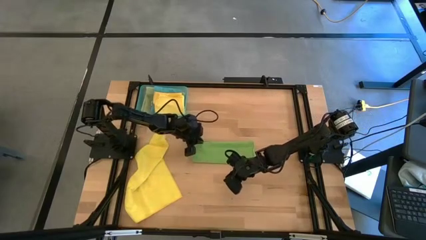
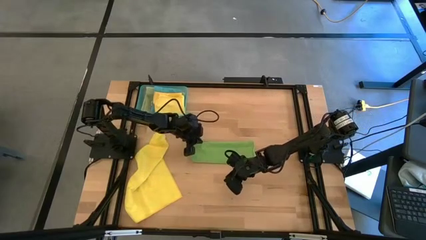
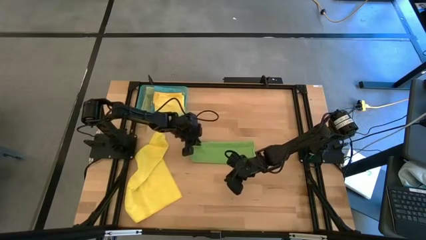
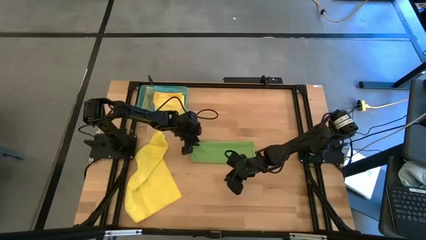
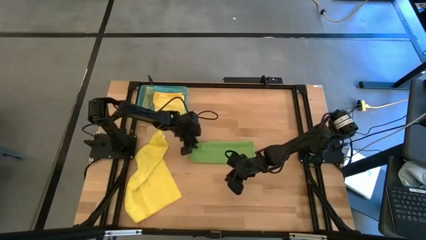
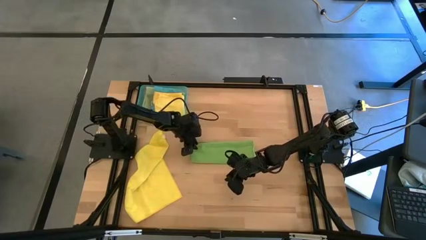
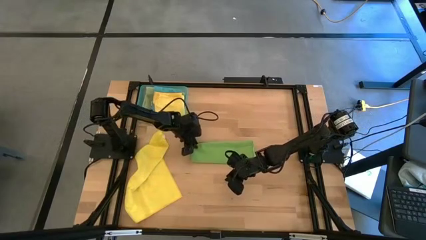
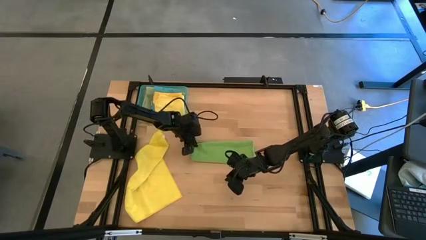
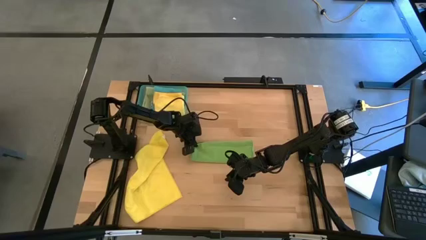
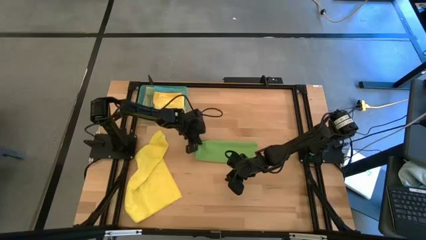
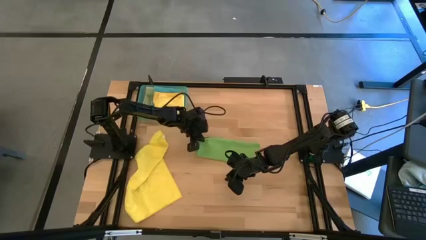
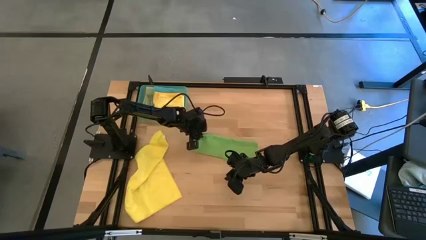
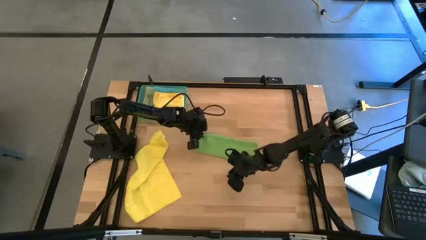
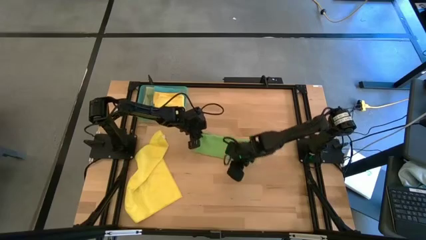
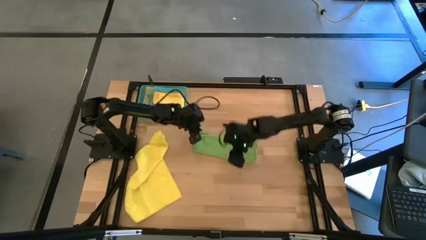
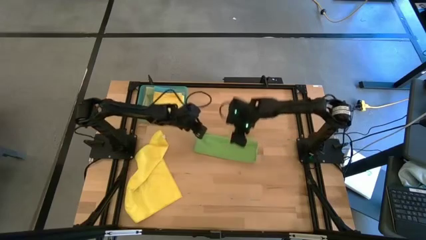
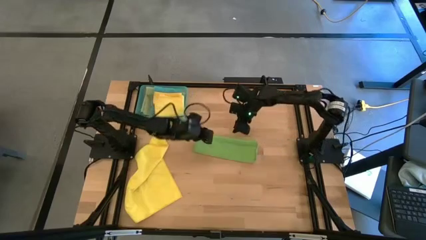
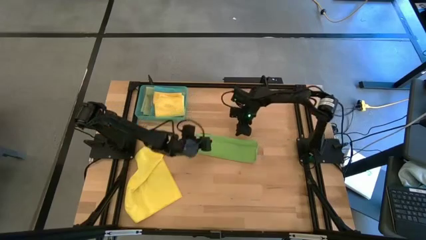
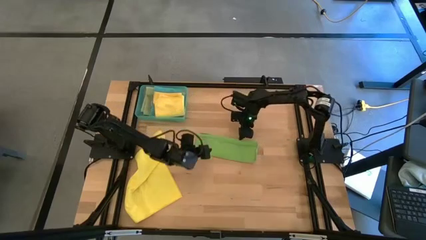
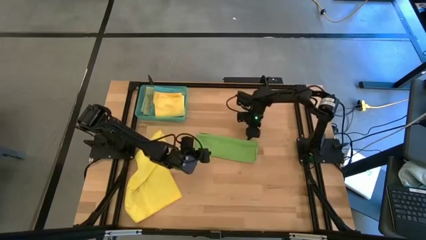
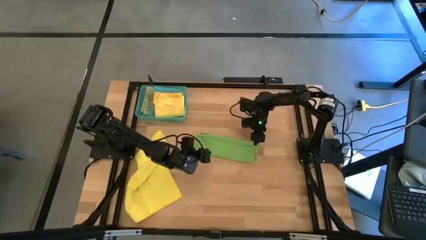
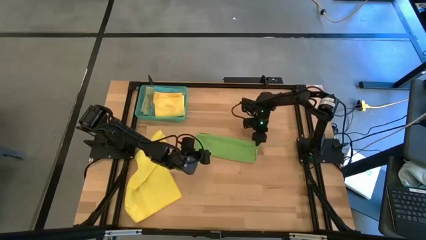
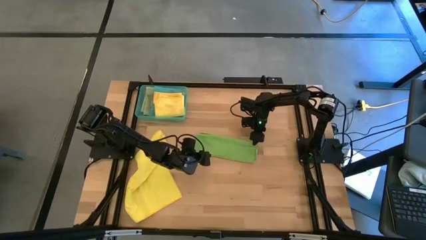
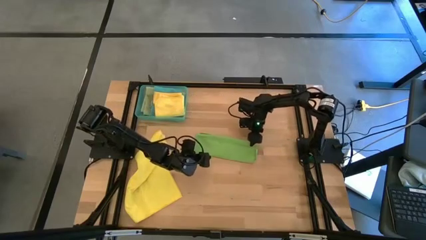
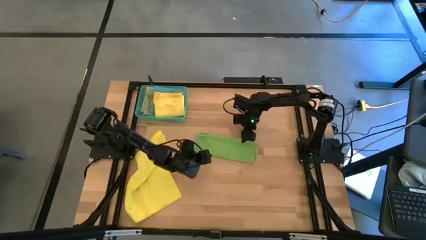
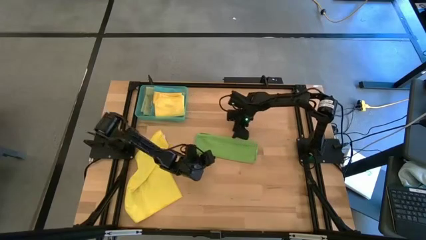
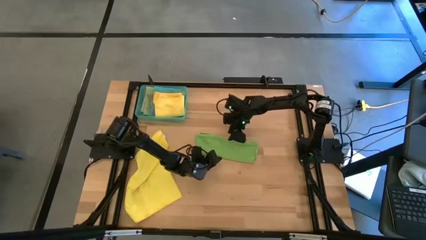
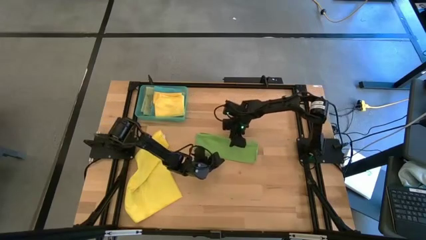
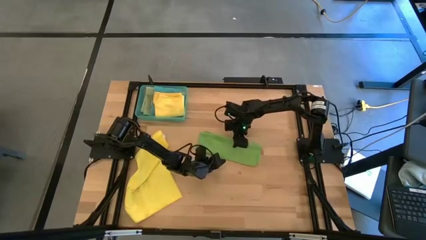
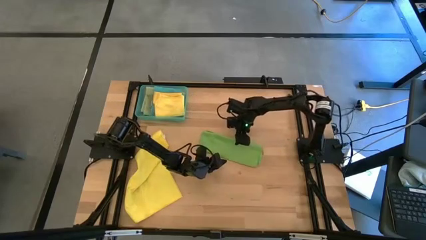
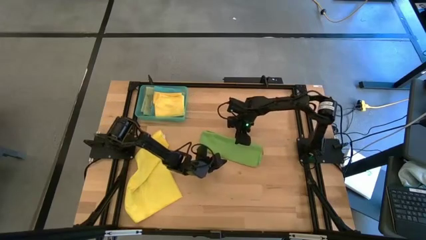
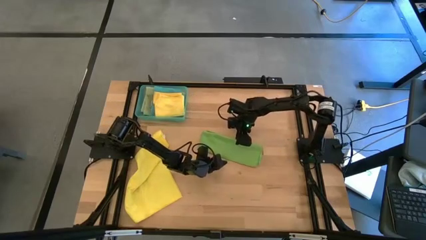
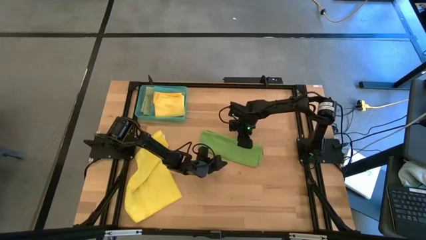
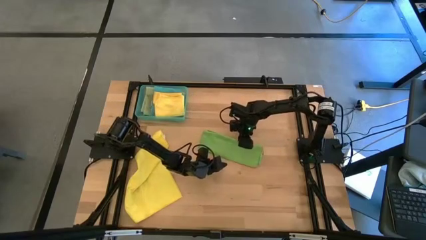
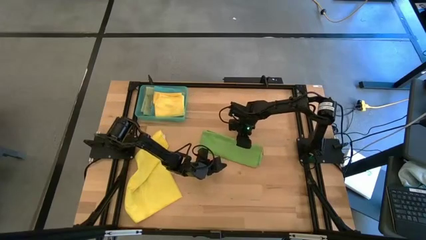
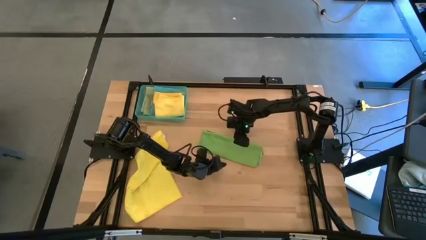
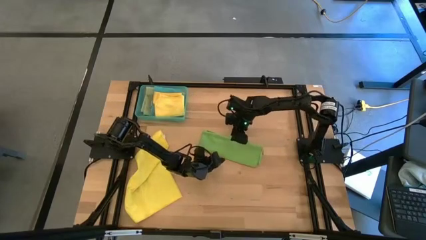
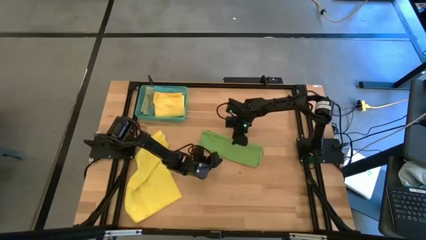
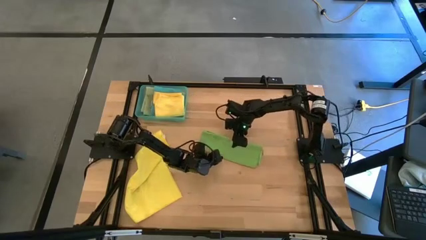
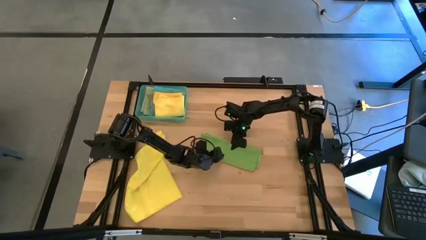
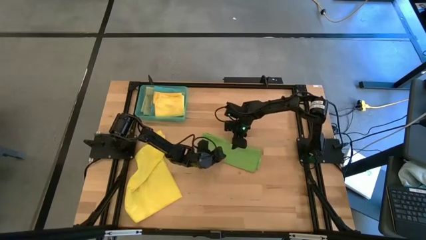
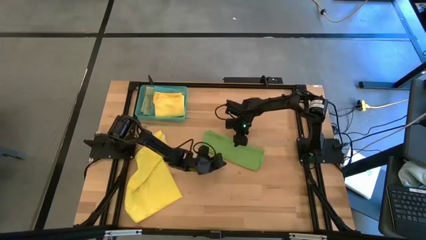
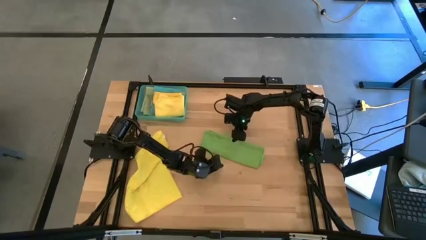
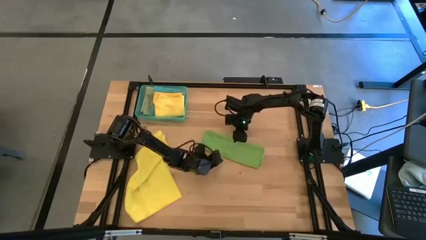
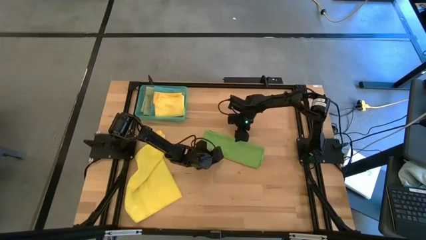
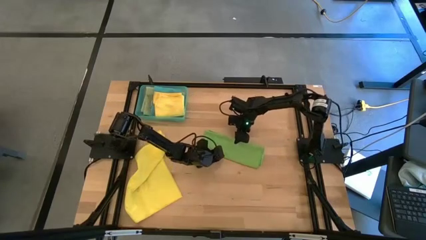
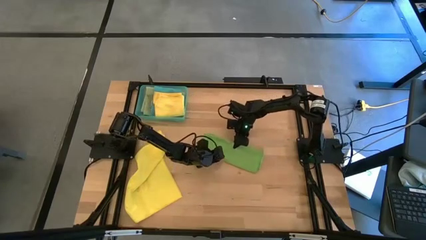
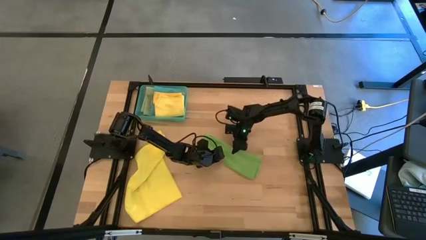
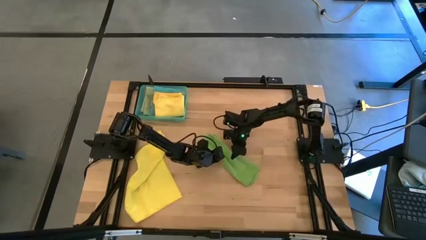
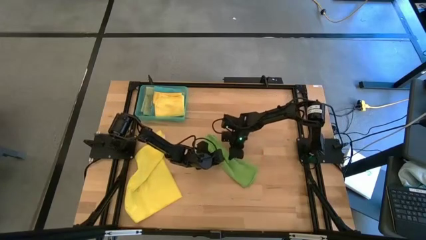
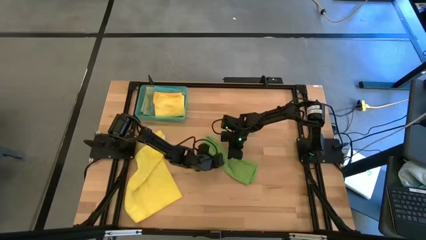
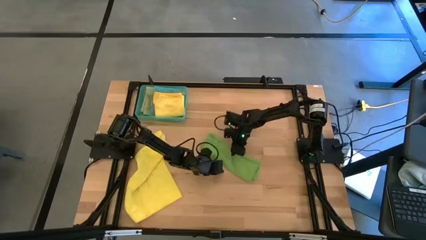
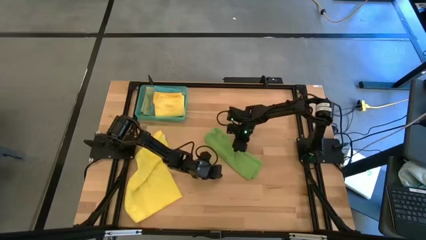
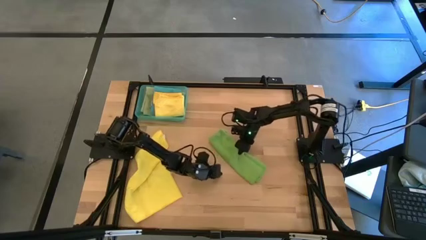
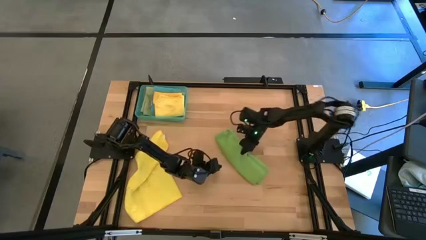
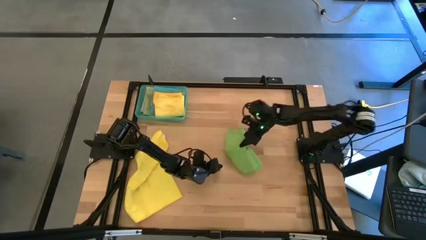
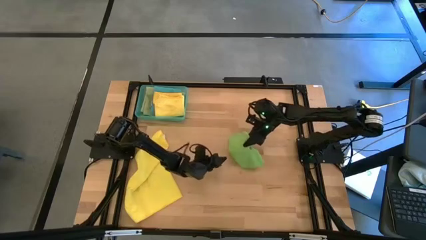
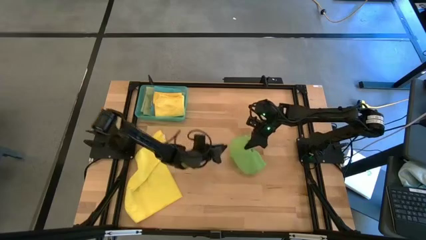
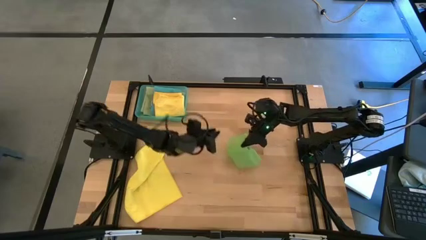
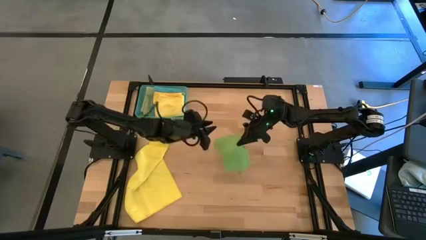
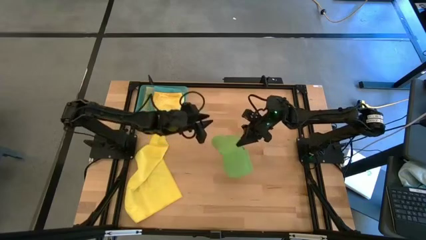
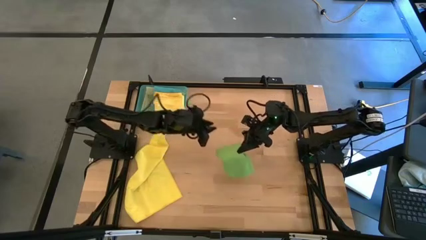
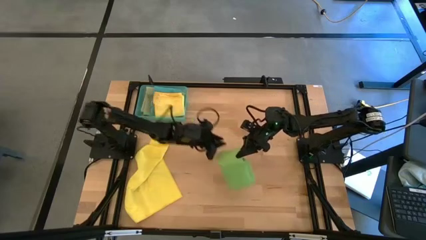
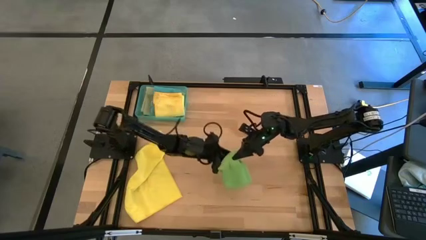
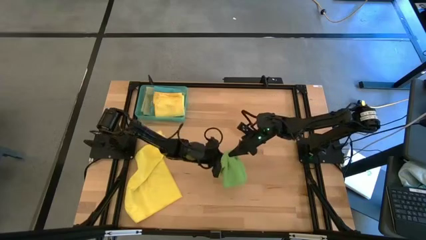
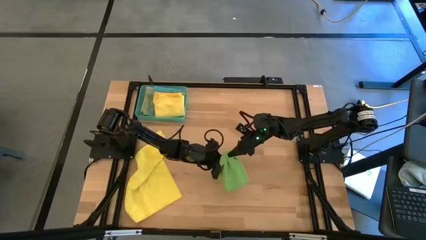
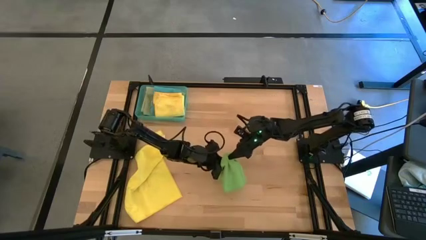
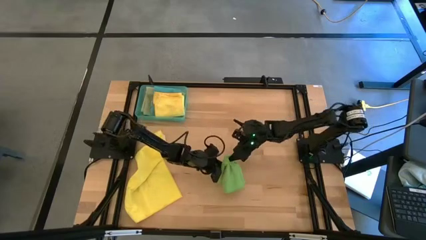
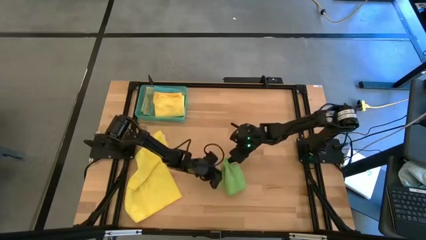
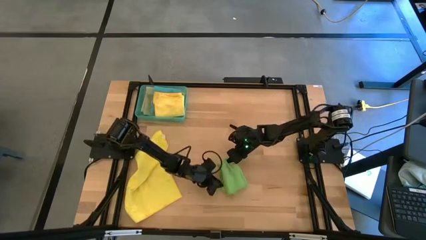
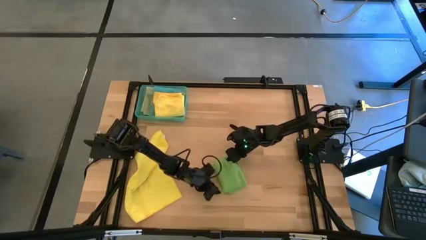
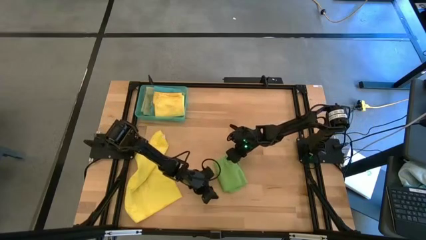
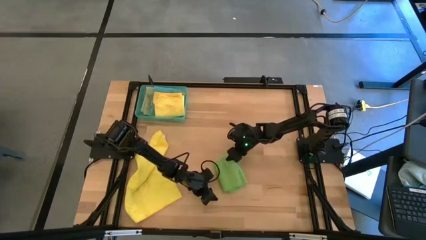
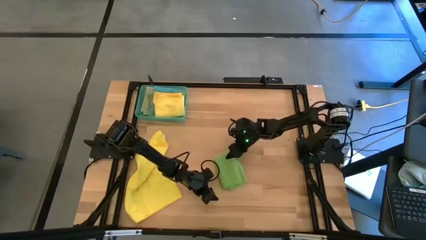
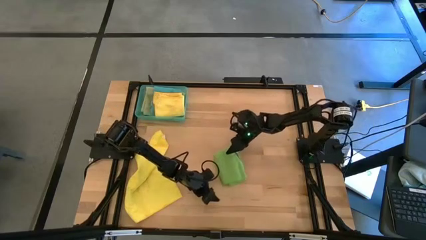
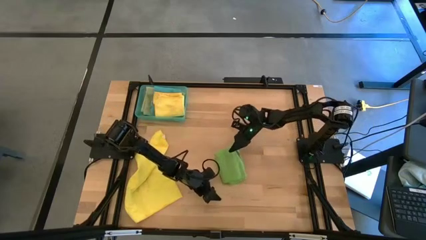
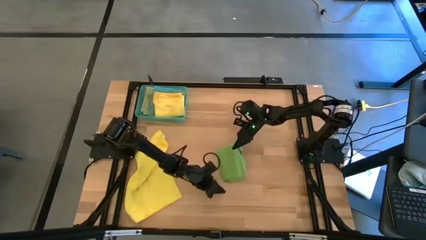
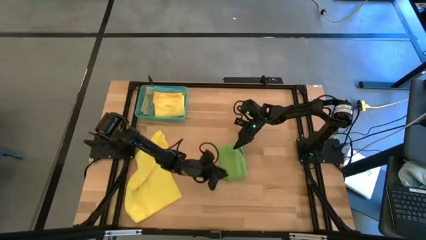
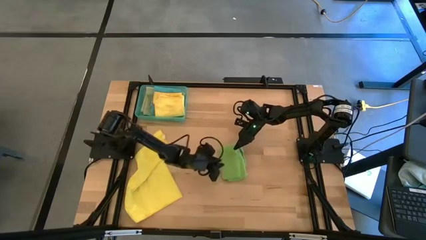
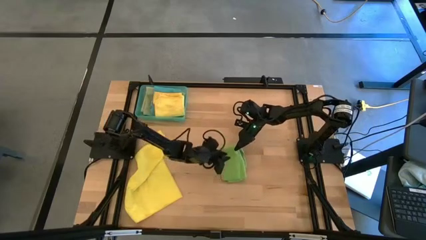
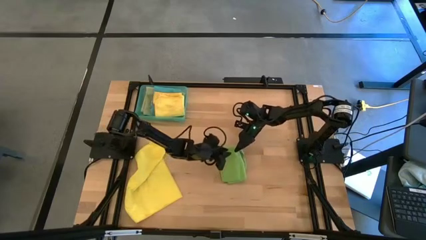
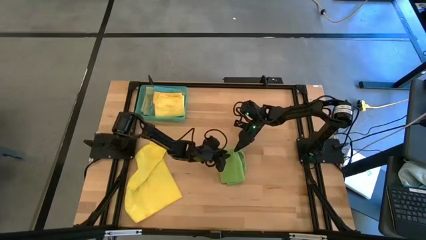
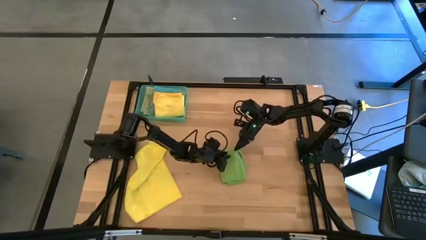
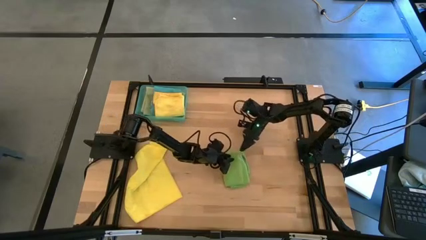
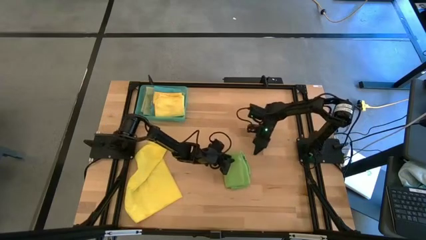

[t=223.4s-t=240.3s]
Task: Fold microfiber towels
Fold the green microfiber cloth
